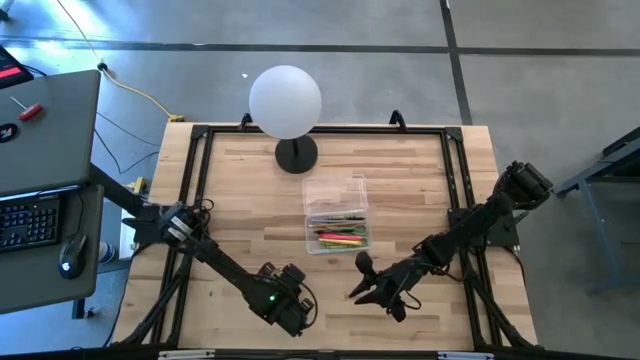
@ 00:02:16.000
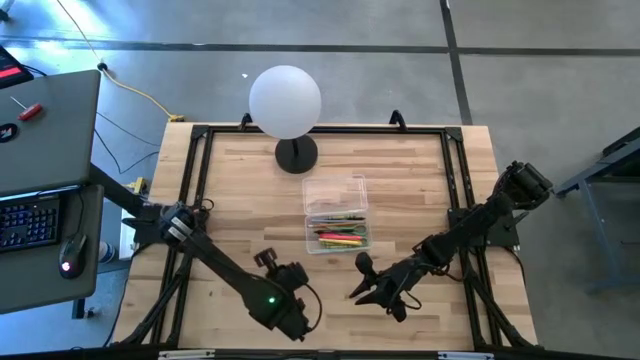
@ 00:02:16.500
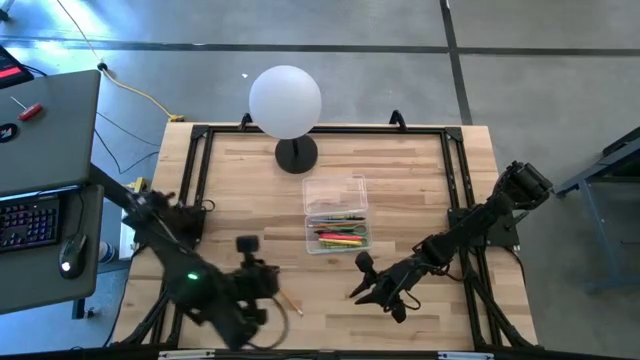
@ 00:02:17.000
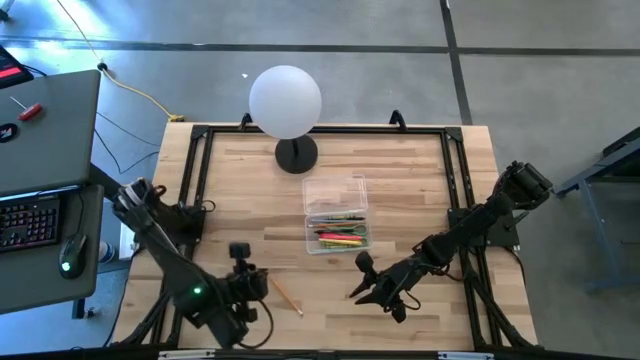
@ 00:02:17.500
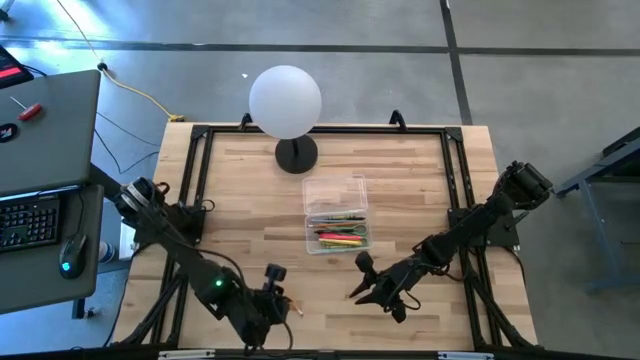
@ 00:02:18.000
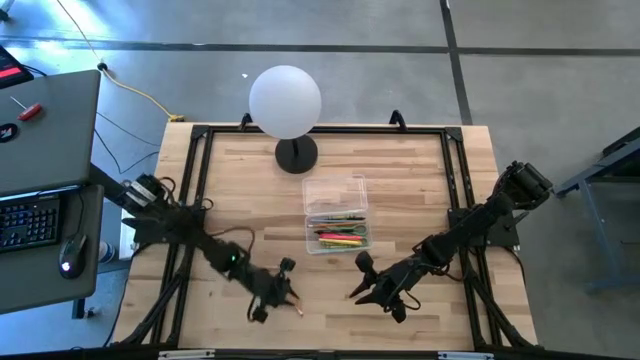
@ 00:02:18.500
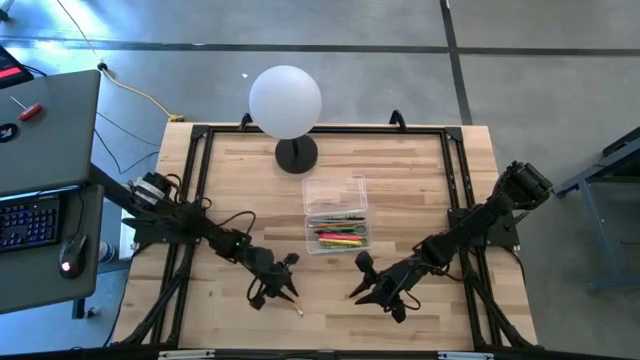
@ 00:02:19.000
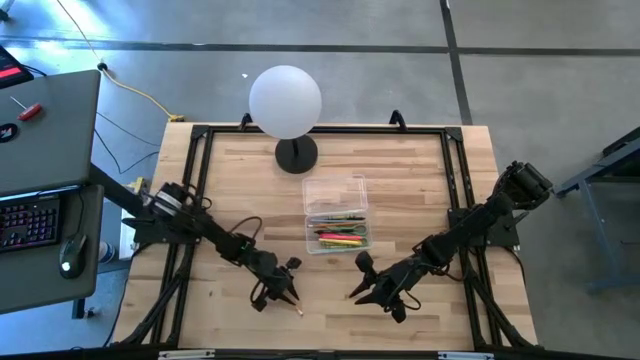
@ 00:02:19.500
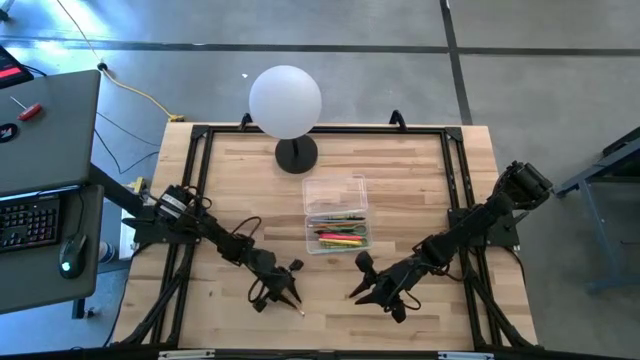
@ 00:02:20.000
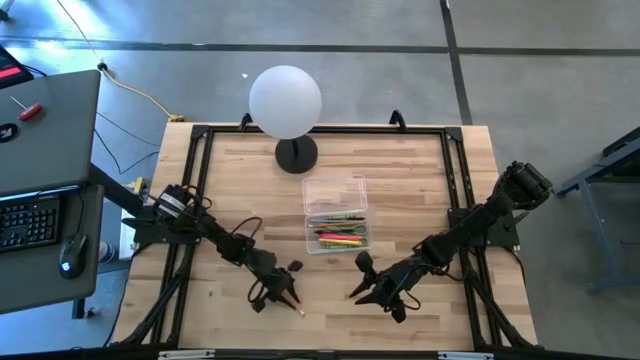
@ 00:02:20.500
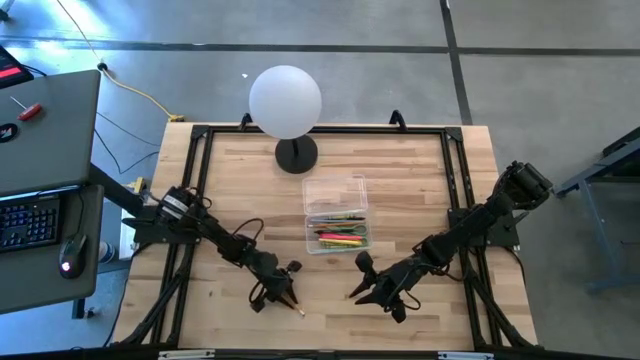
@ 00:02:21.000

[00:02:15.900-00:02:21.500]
Task: Pick & place school supplies into a supply box
Put the orange pencil into the transparent supply box

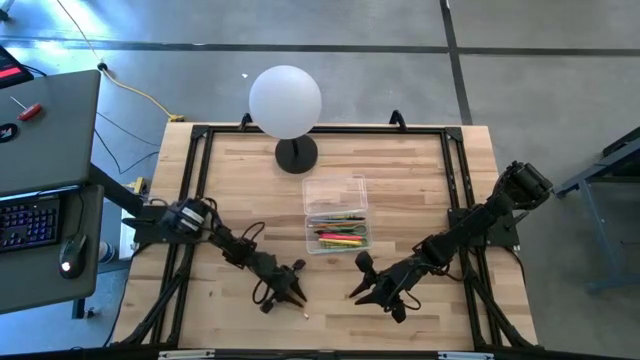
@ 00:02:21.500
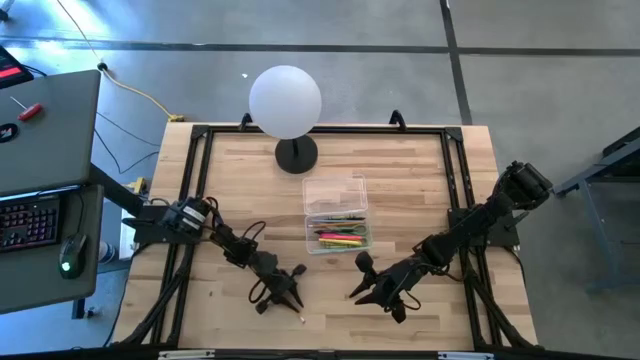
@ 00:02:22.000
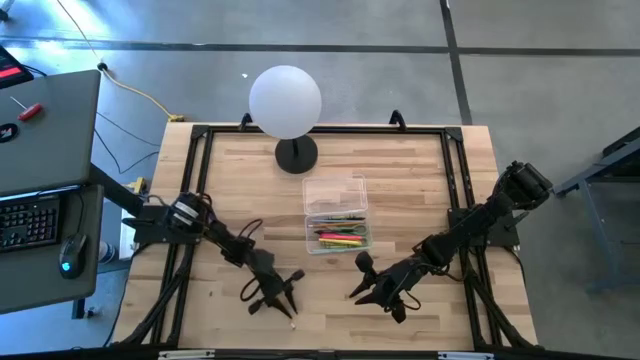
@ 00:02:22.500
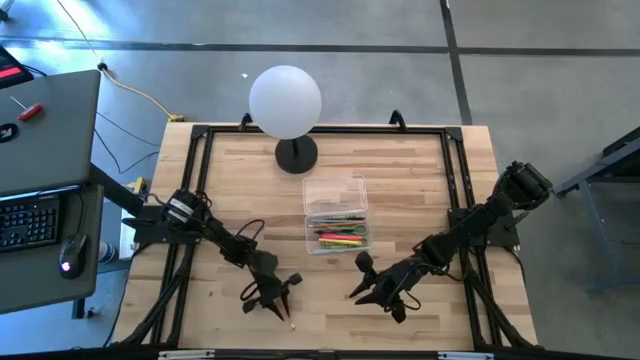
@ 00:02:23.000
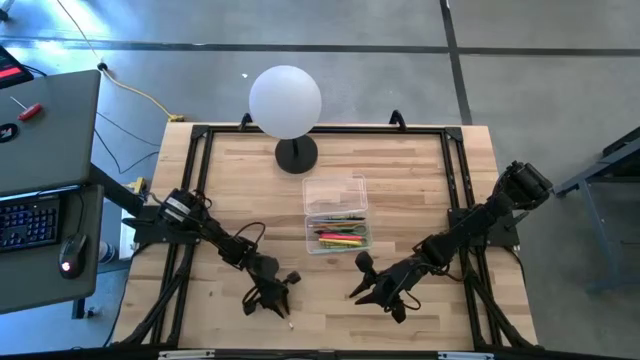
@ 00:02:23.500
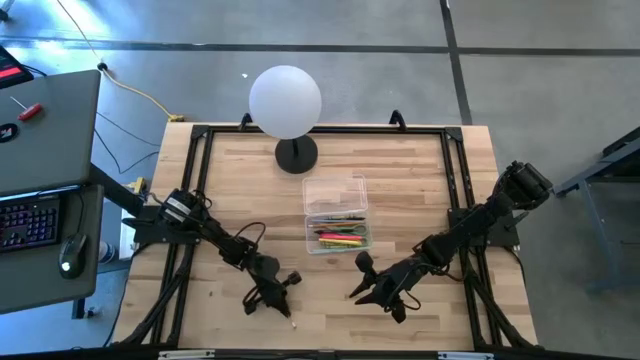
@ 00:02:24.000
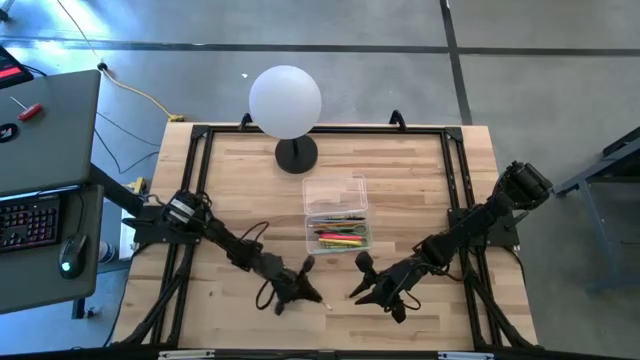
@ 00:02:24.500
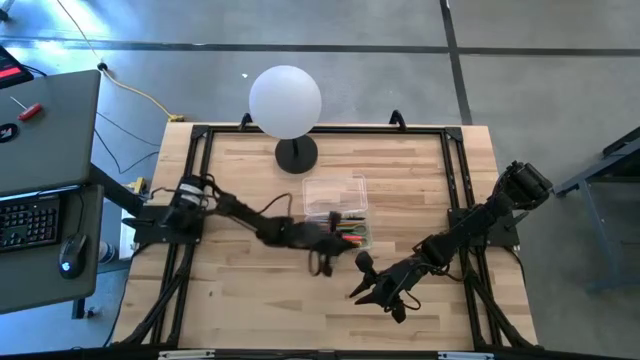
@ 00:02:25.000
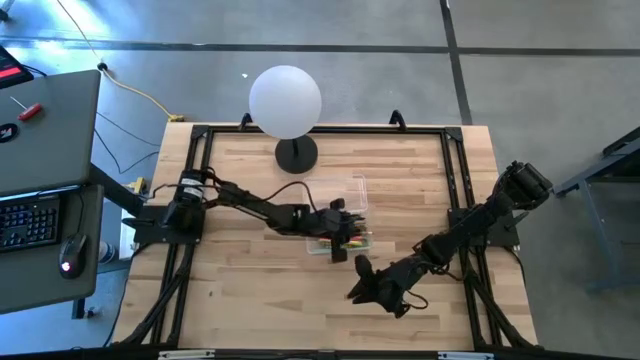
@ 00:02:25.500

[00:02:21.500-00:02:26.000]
Put the orange pencil into the transparent supply box

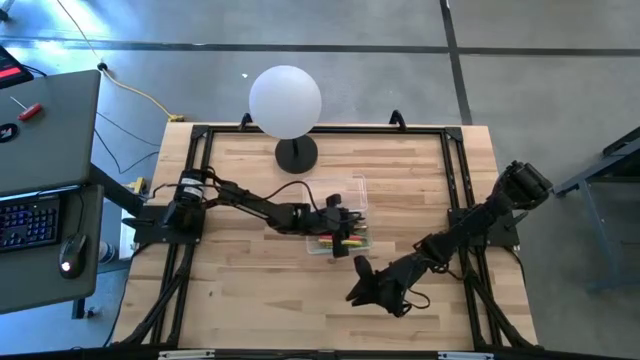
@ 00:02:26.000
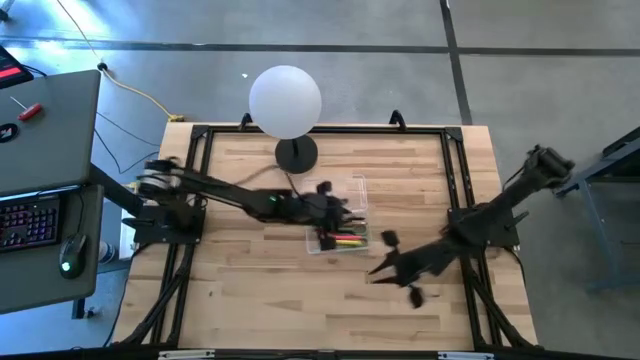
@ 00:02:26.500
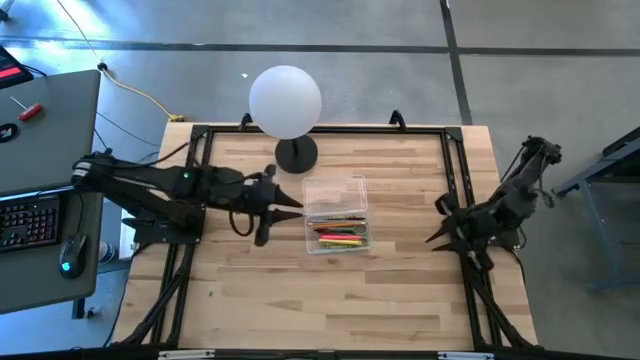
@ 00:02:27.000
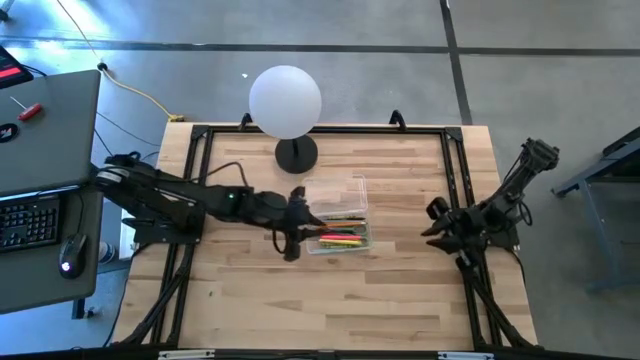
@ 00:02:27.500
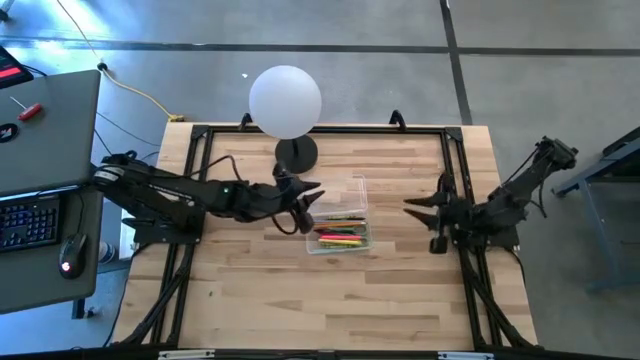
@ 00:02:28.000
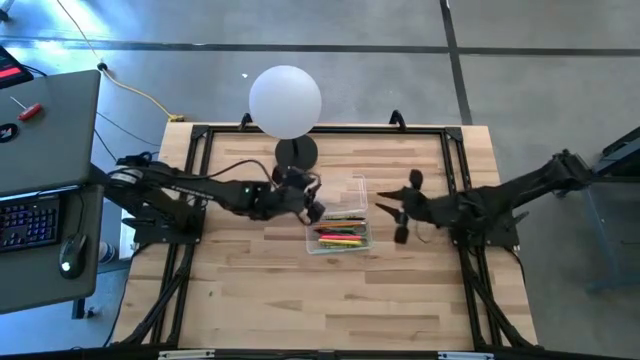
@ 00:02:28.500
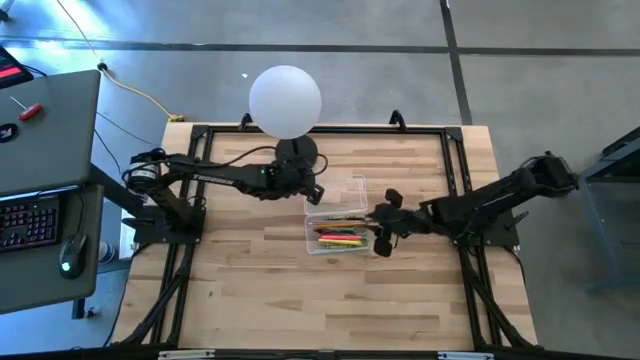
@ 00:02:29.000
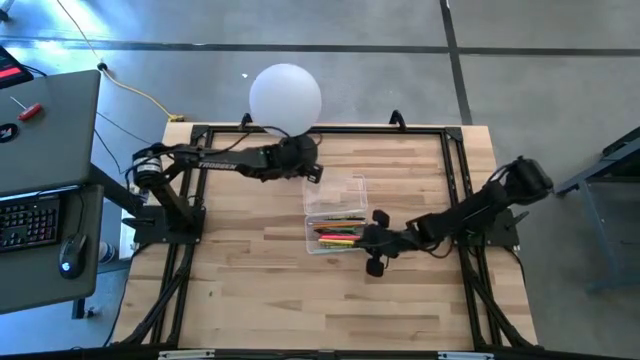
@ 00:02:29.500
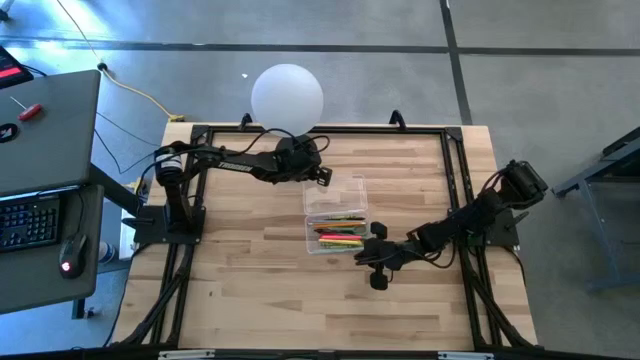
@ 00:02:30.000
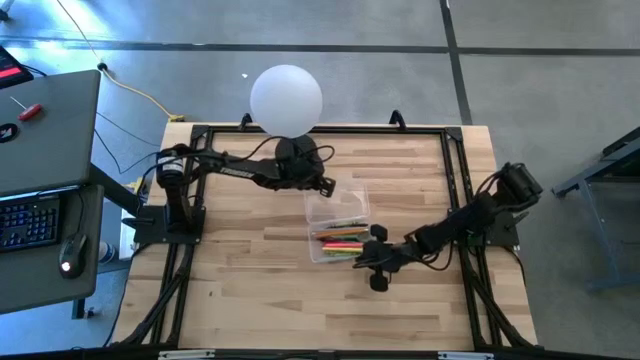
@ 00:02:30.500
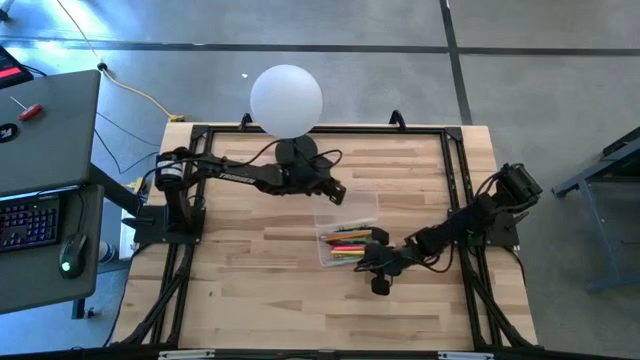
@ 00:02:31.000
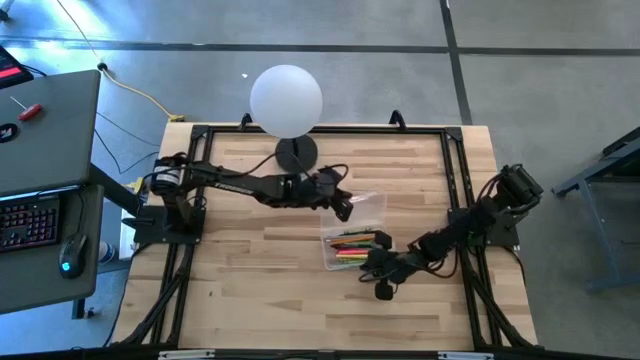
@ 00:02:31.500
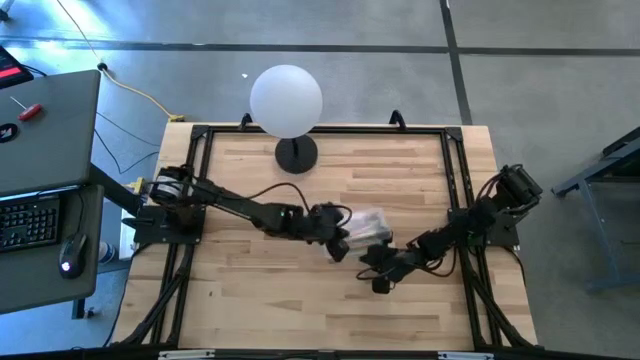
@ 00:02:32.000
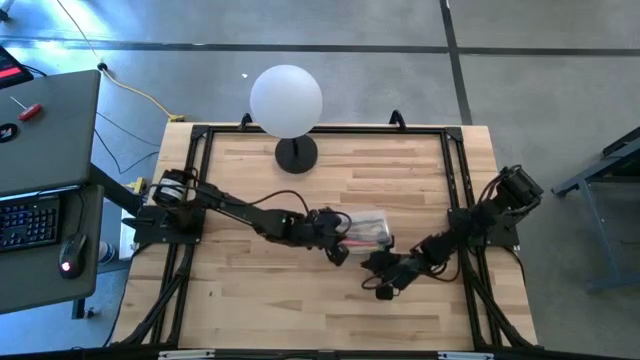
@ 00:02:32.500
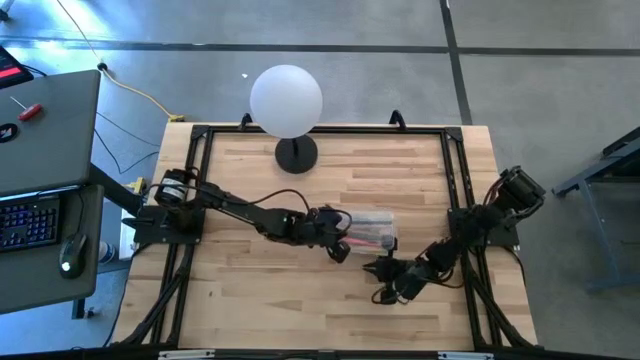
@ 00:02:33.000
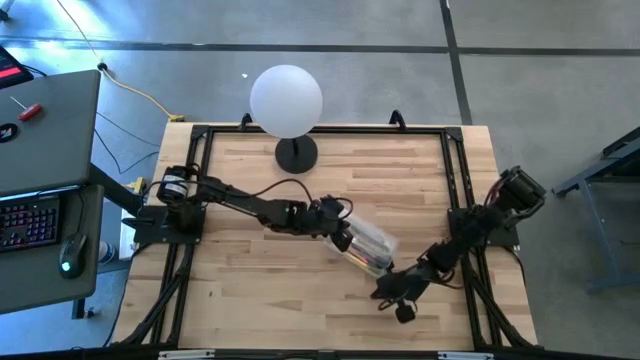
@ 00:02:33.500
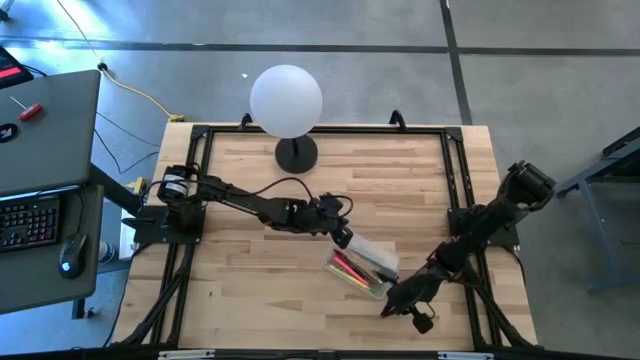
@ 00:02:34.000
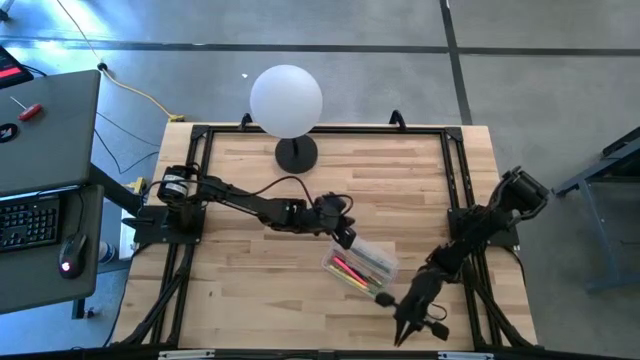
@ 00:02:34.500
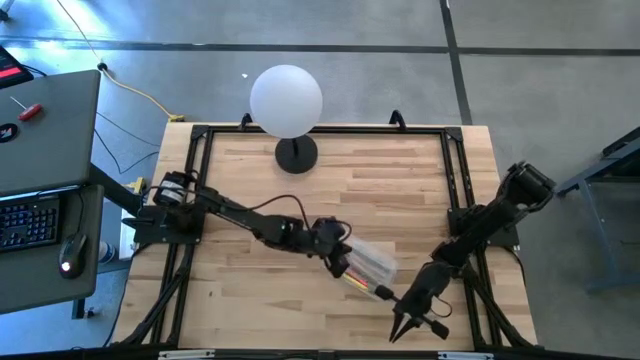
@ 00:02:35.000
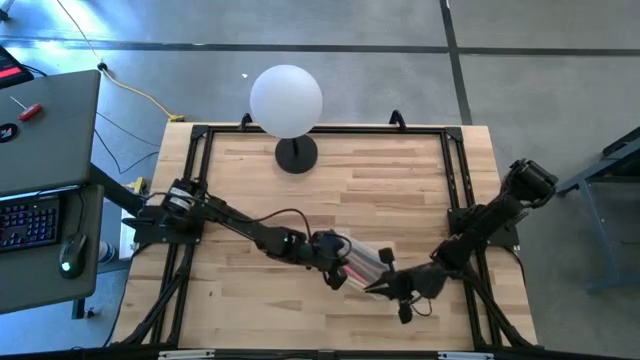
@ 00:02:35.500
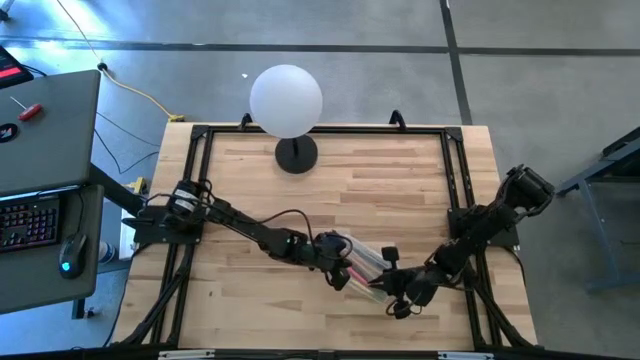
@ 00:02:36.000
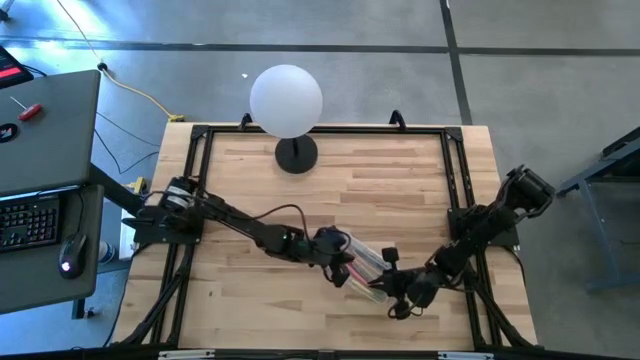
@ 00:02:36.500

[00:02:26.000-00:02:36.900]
Close the transparent supply box

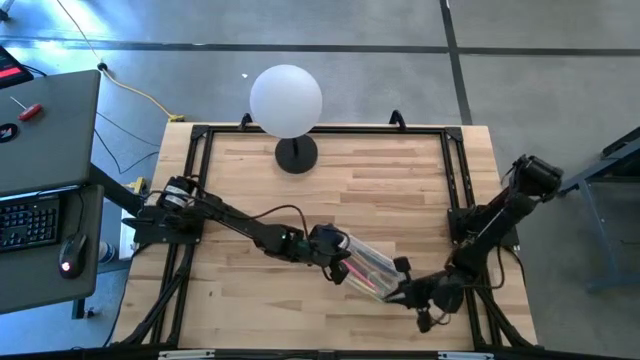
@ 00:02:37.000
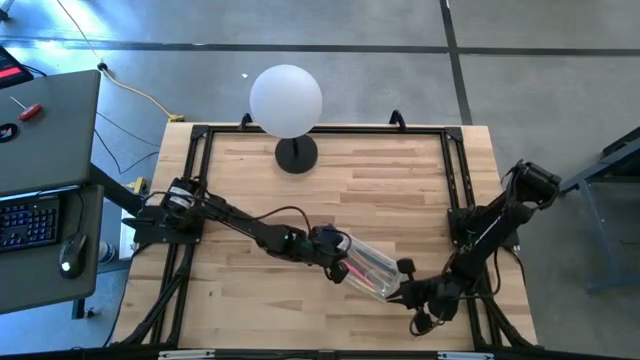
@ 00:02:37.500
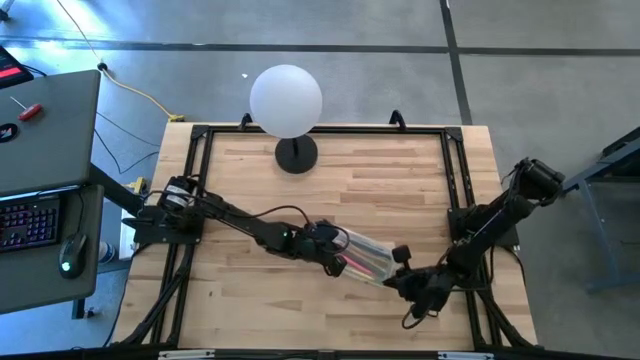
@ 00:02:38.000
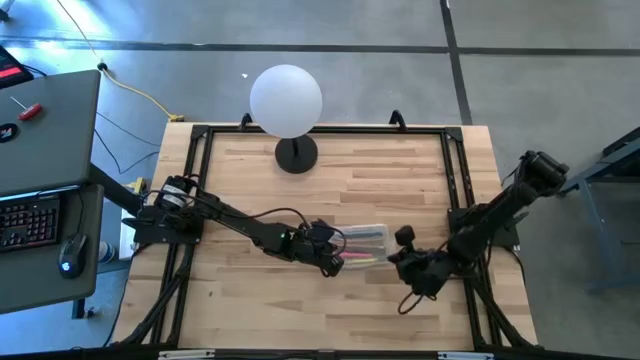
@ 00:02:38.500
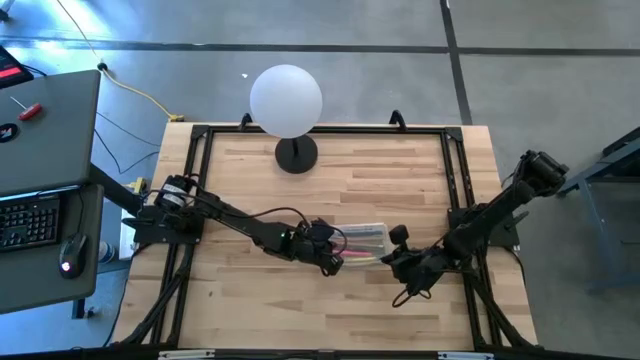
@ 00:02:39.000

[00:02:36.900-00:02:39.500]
Adjust the transparent supply box
